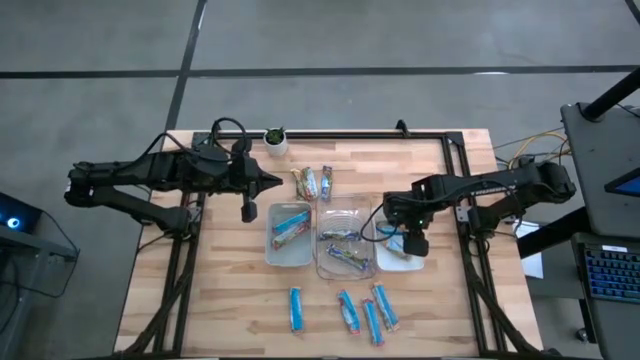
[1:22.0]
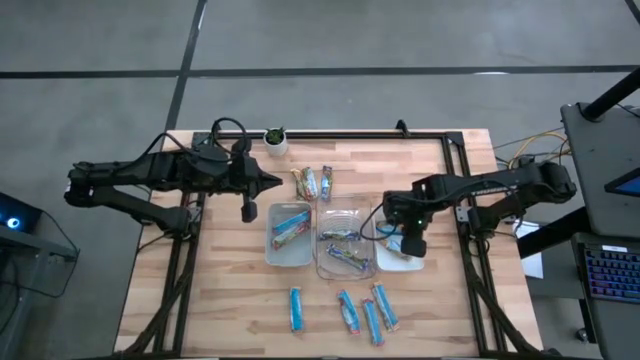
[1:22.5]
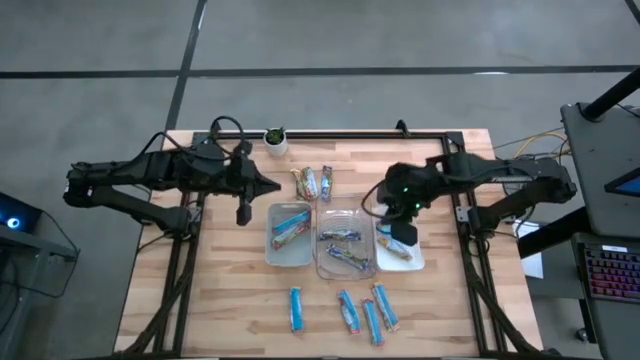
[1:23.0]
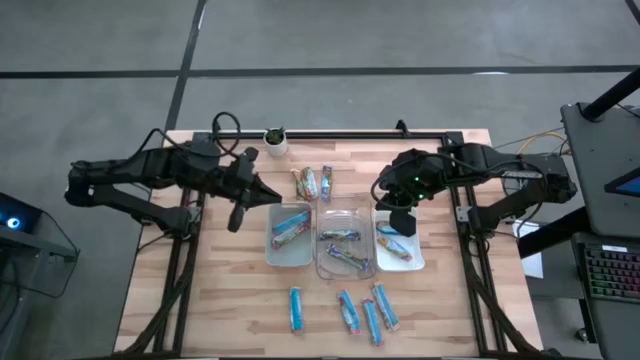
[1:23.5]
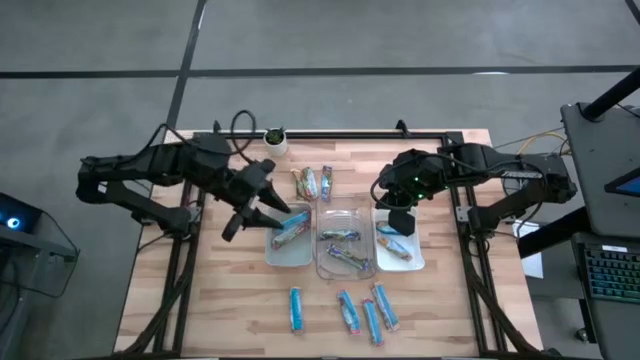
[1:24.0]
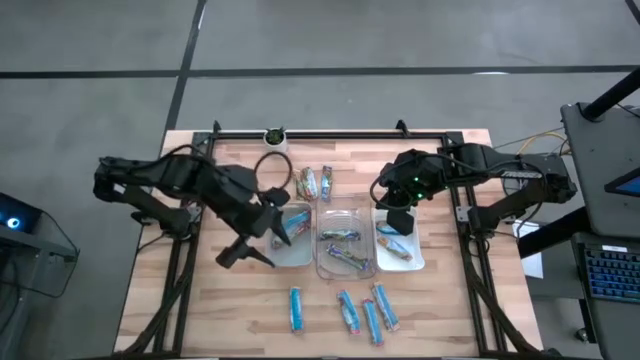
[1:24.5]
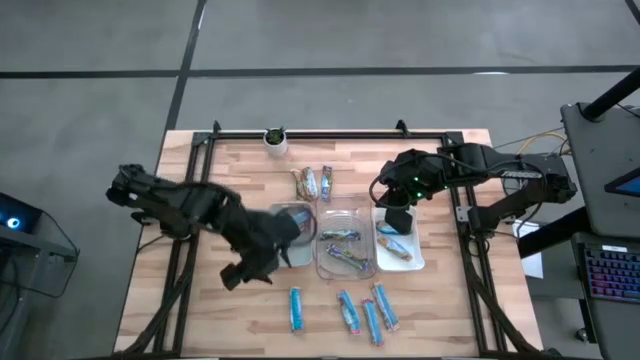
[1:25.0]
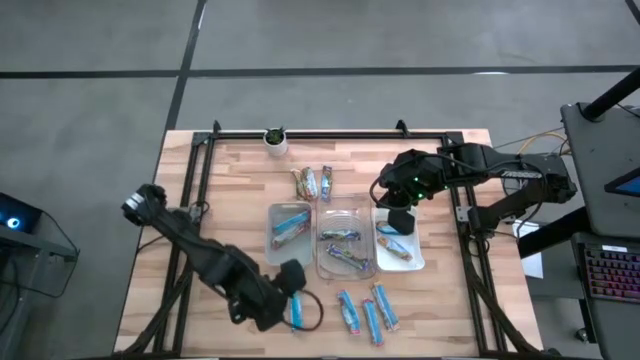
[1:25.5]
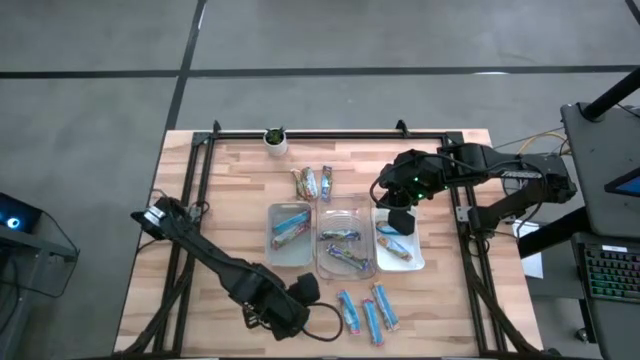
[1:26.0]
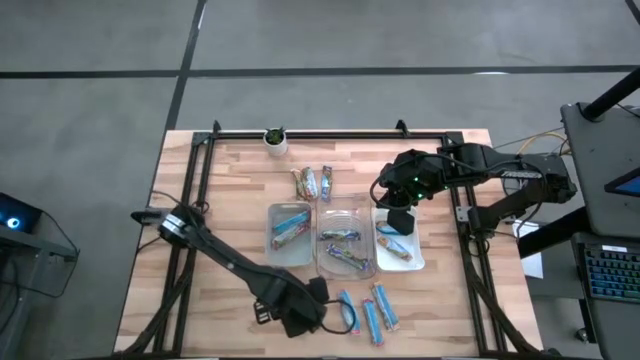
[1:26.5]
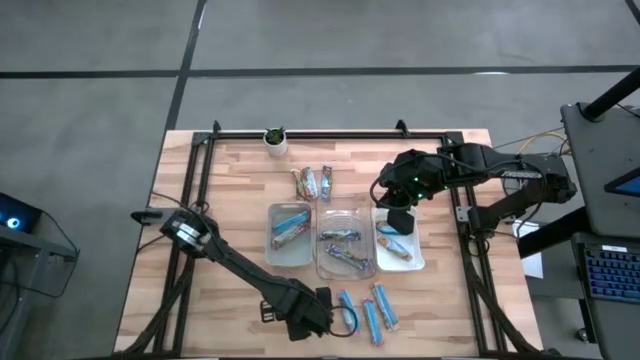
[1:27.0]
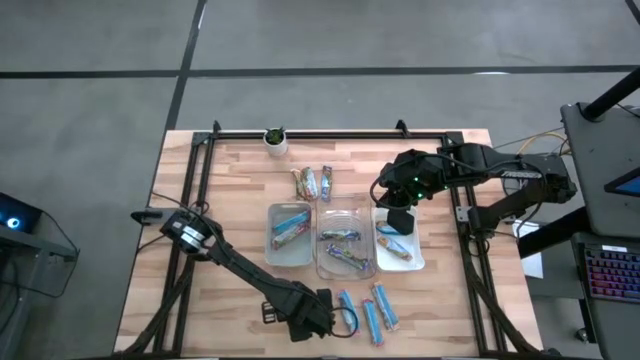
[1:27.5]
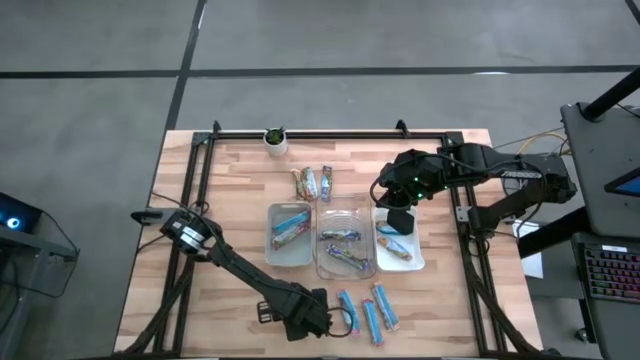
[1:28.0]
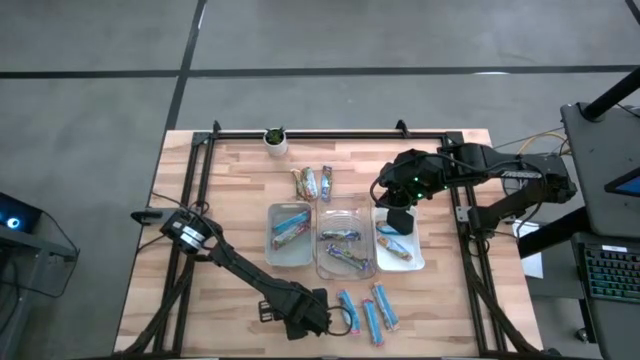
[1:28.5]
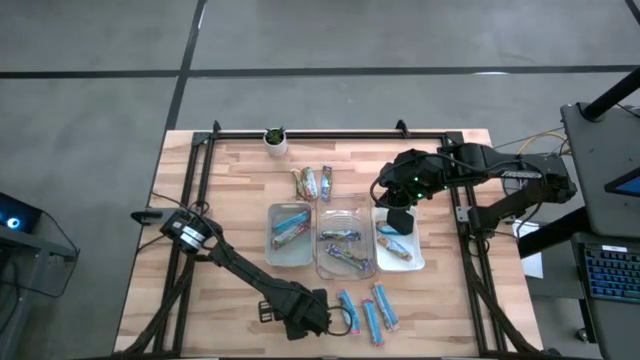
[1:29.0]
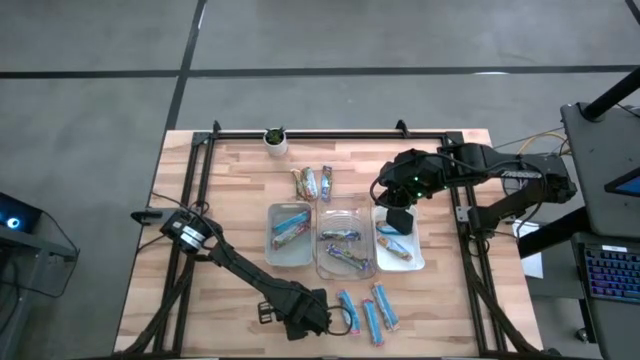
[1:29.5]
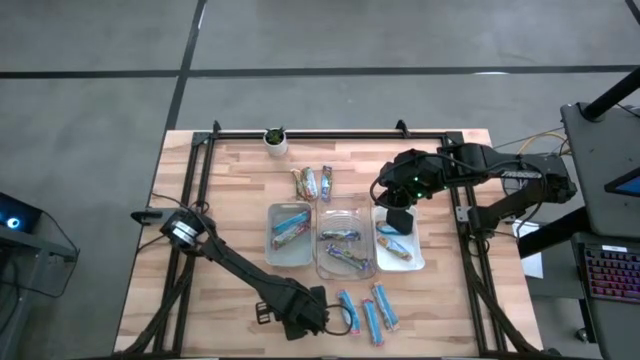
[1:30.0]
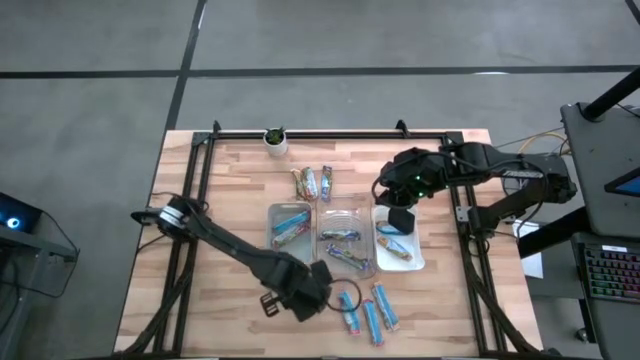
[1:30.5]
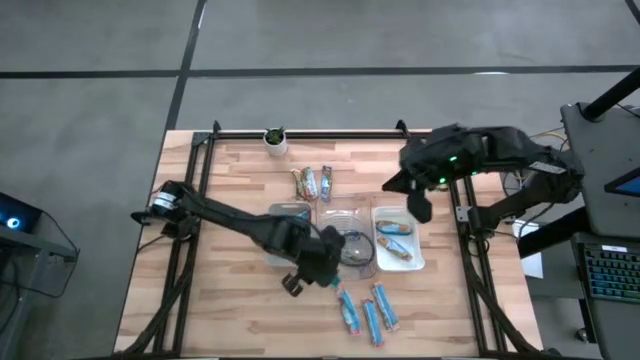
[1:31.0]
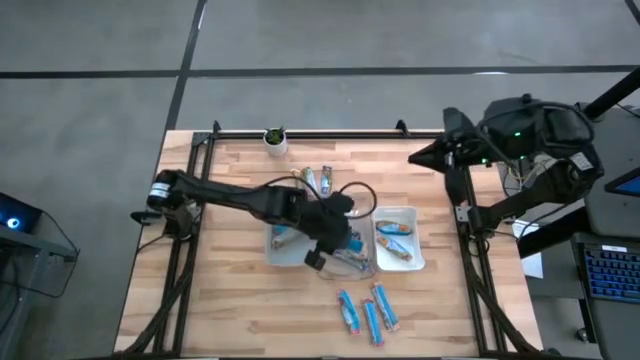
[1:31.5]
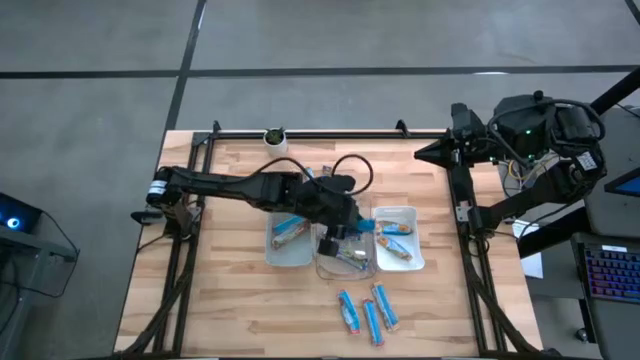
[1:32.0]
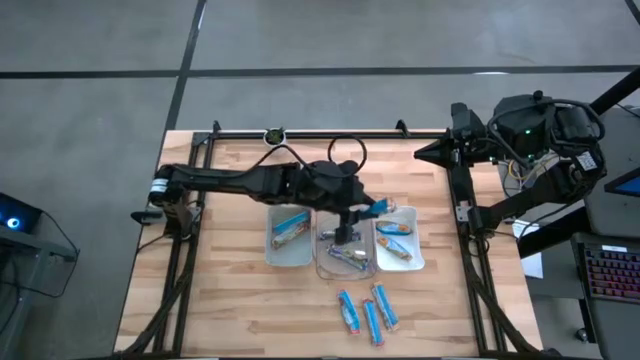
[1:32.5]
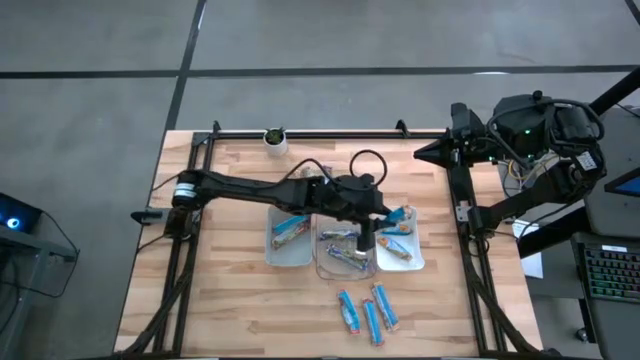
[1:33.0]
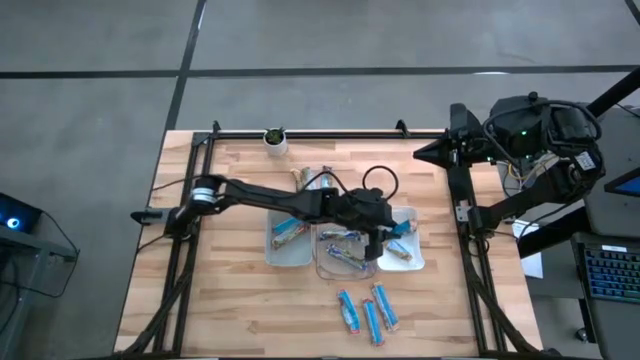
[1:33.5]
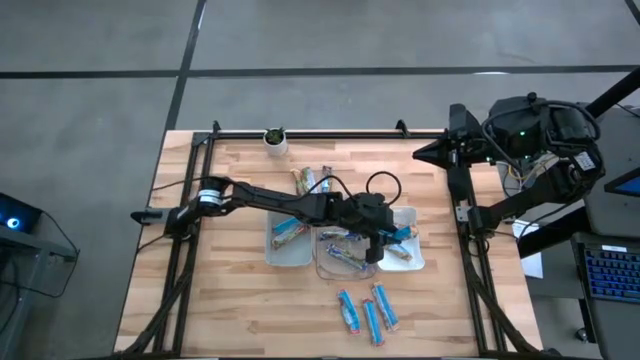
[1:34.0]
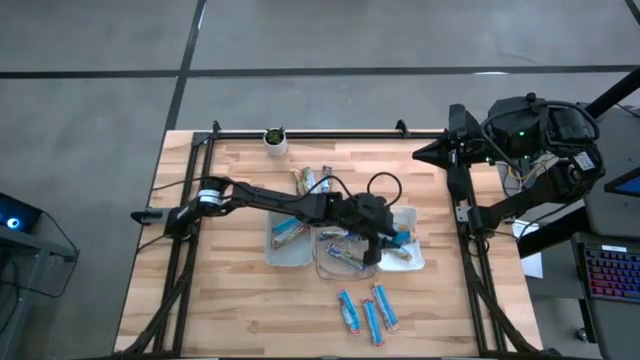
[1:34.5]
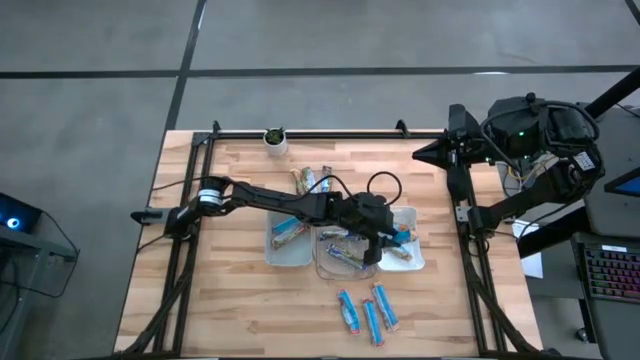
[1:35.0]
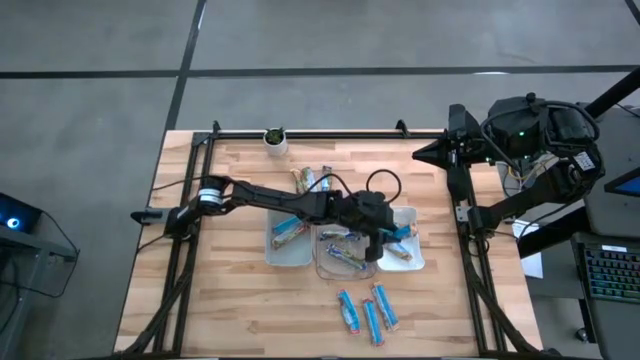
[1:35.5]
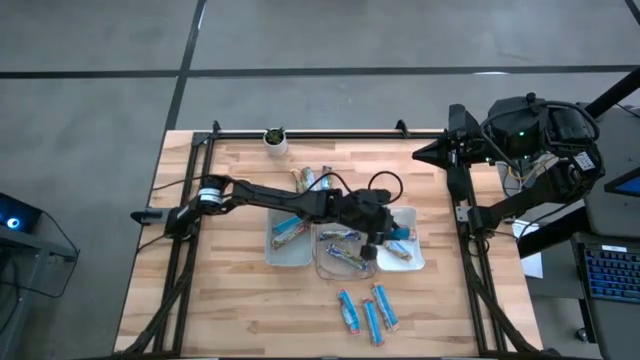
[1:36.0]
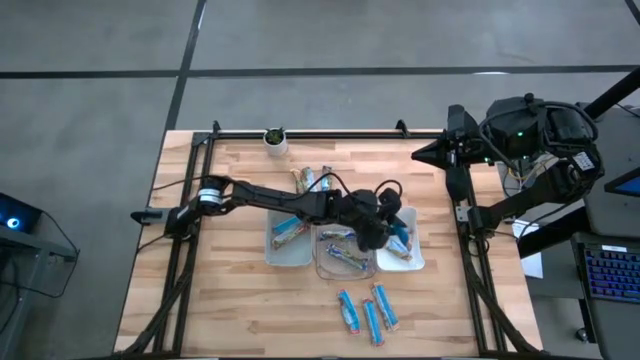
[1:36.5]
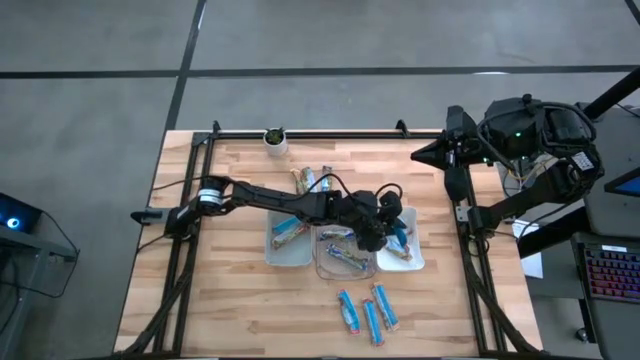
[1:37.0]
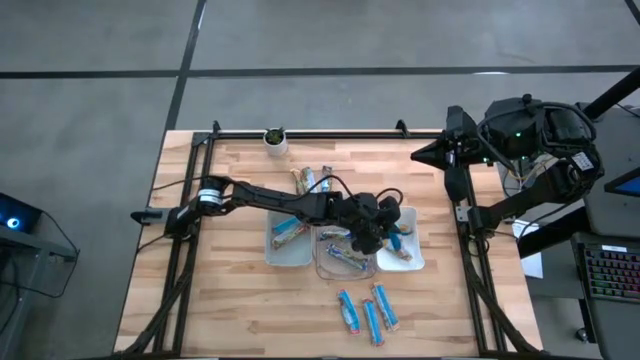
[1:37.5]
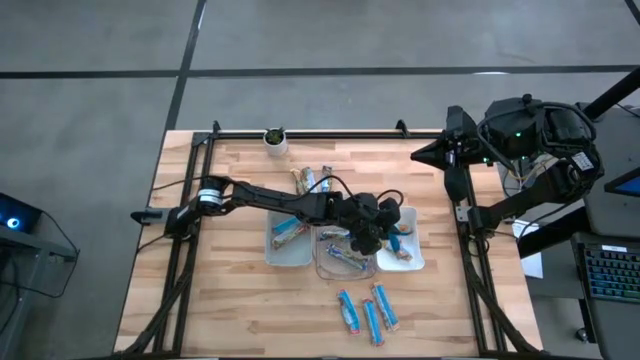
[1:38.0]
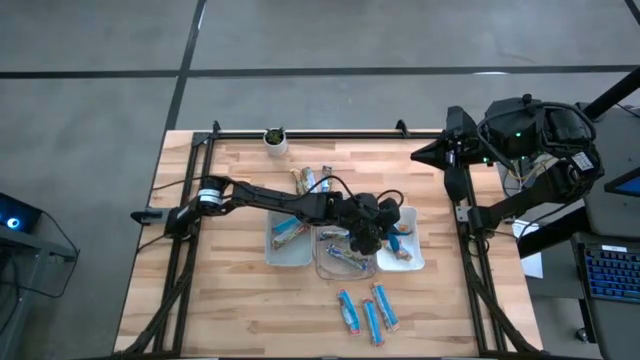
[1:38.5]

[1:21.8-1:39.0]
Task: Pick and place Granola Bars by type
Put the left yellow granola bar into the white bin

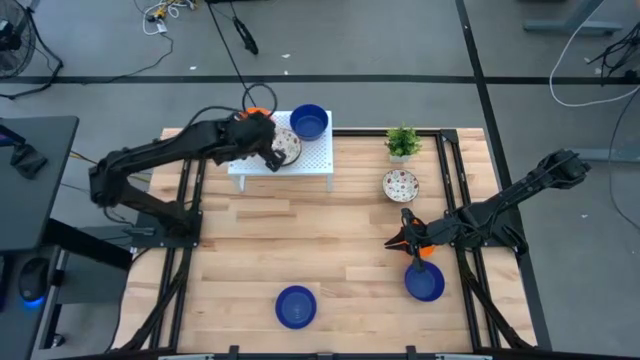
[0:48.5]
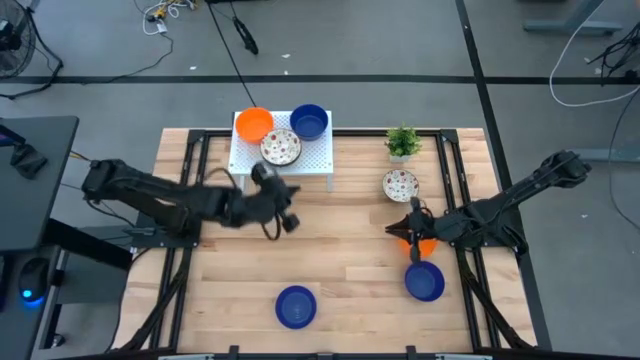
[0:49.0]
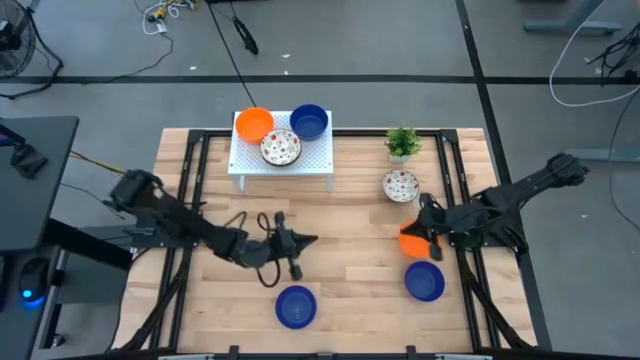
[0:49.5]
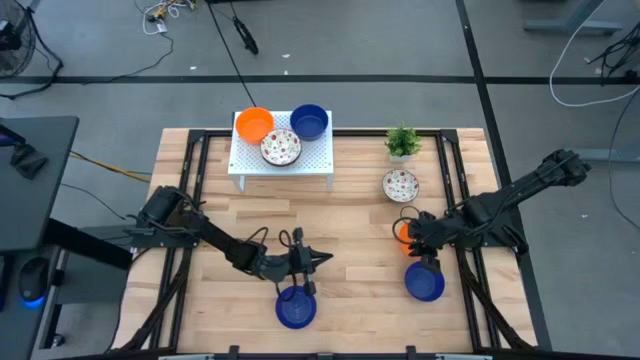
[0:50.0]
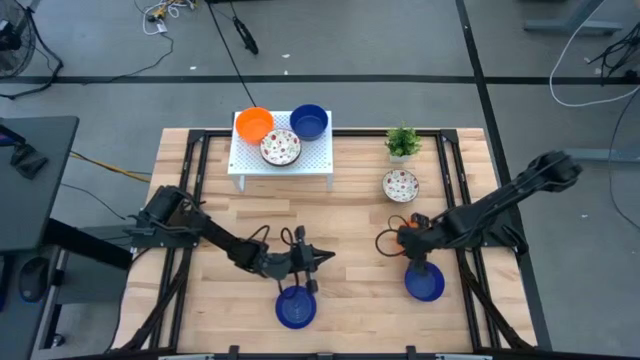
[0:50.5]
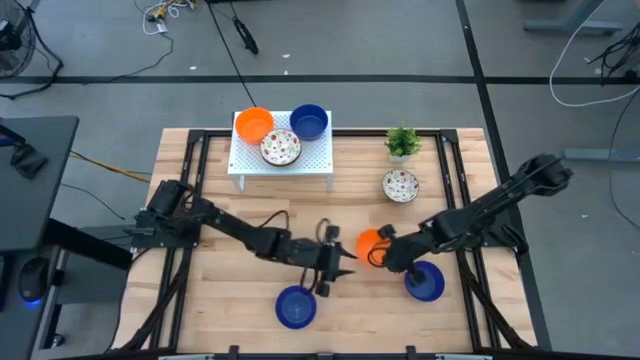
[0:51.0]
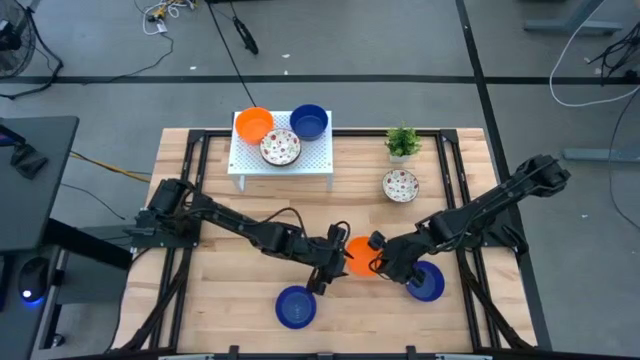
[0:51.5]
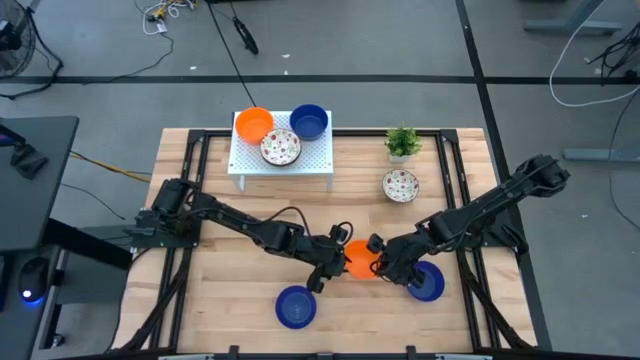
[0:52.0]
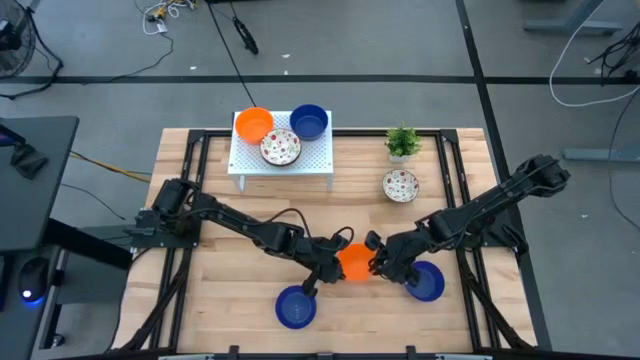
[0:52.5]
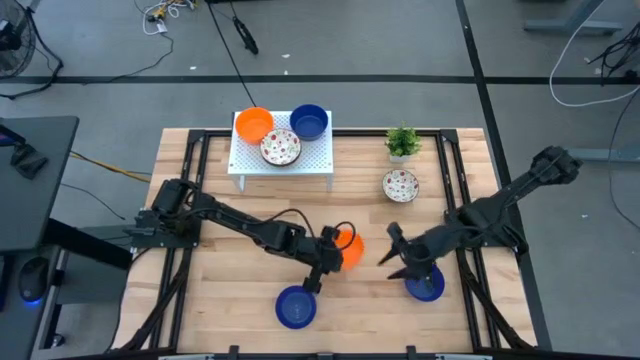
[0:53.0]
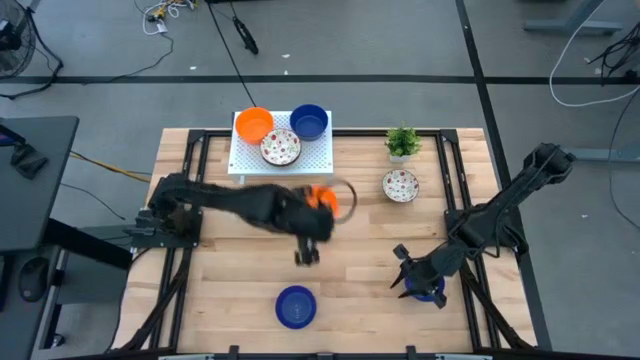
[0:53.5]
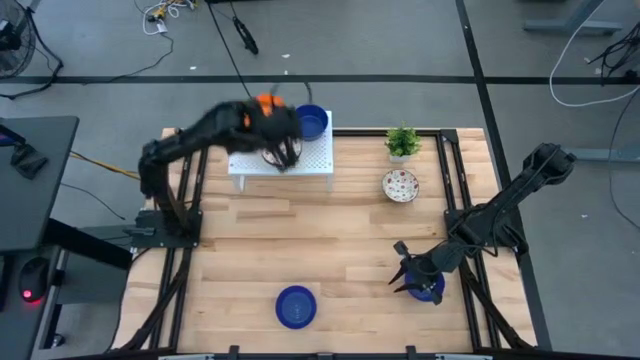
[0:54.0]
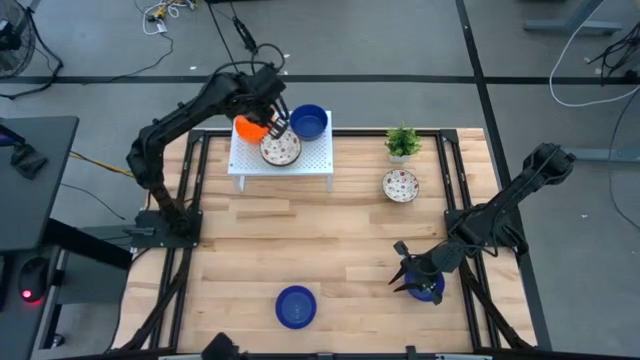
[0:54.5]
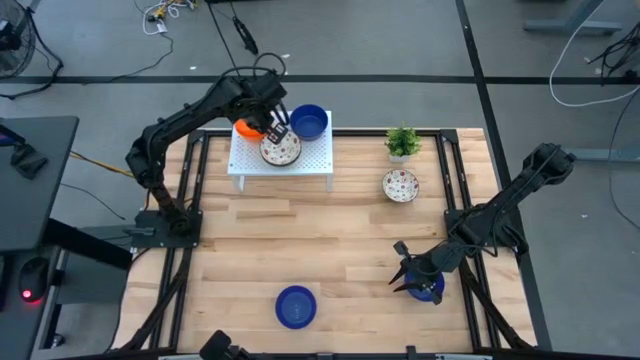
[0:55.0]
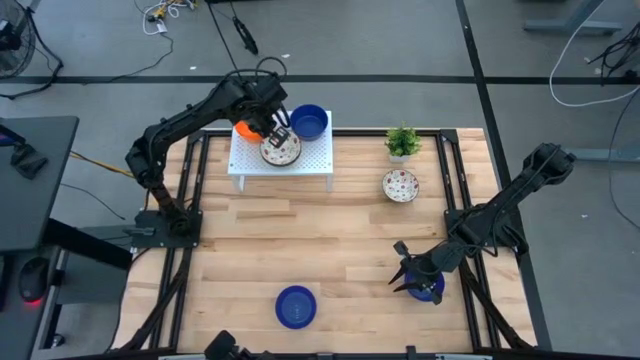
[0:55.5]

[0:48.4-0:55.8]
Task: Pick & Place Mini bowls
Stack the orange bowl on top of the orange bowl on the shelf
